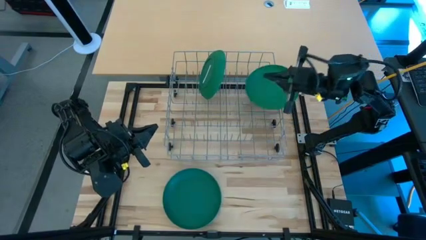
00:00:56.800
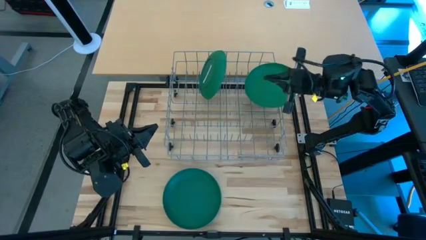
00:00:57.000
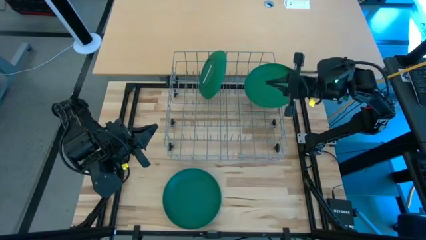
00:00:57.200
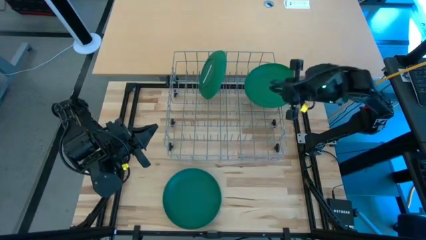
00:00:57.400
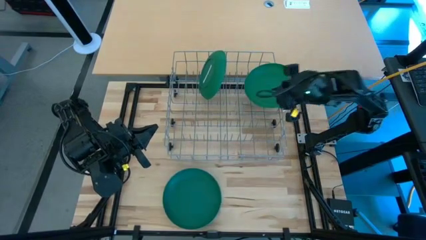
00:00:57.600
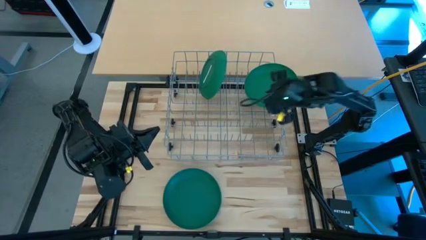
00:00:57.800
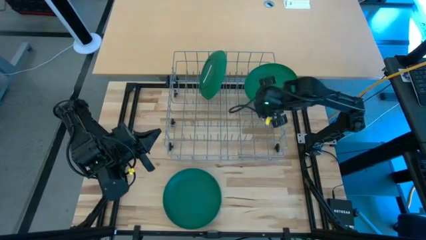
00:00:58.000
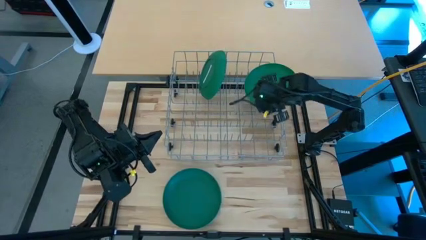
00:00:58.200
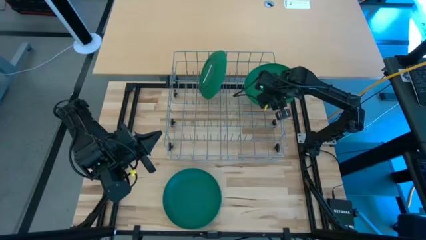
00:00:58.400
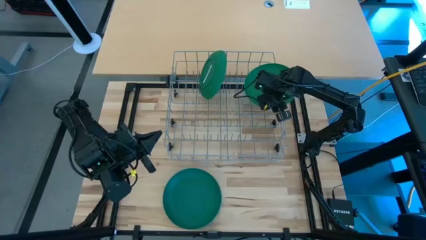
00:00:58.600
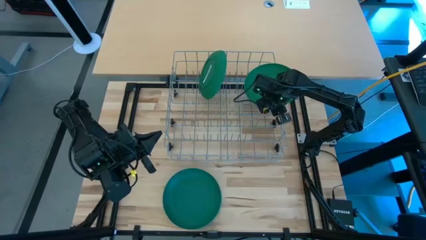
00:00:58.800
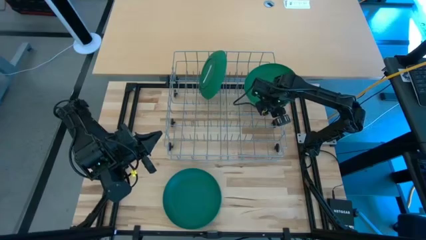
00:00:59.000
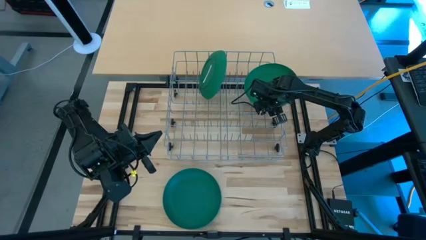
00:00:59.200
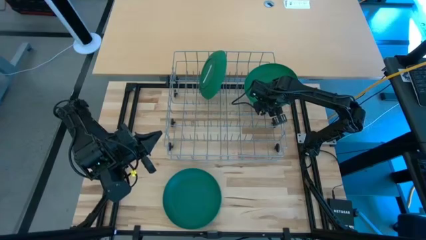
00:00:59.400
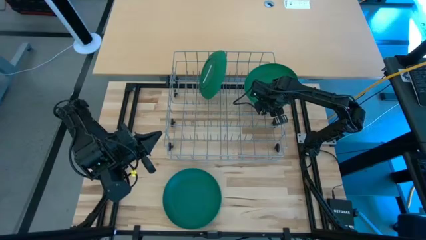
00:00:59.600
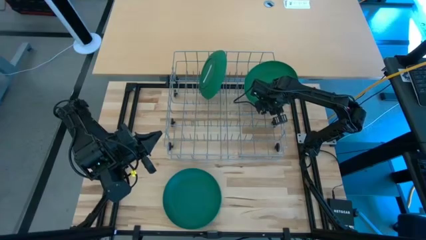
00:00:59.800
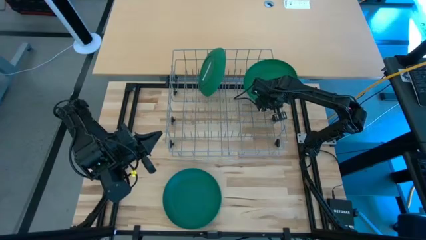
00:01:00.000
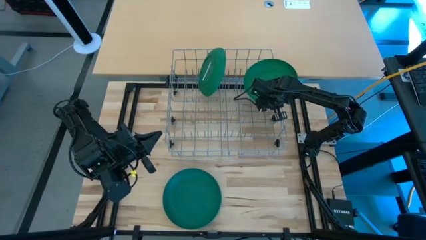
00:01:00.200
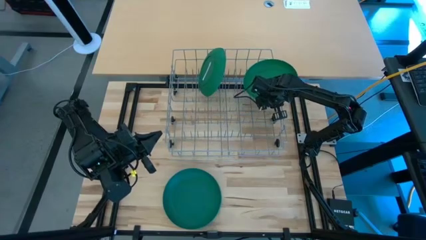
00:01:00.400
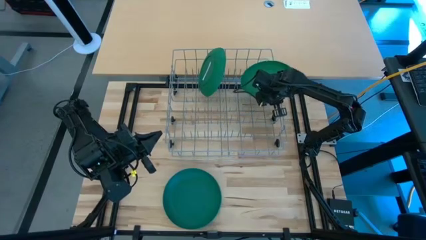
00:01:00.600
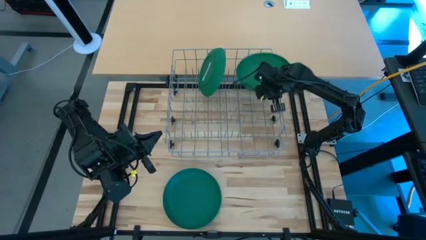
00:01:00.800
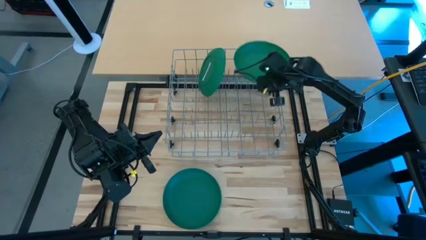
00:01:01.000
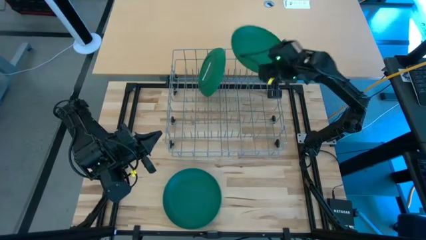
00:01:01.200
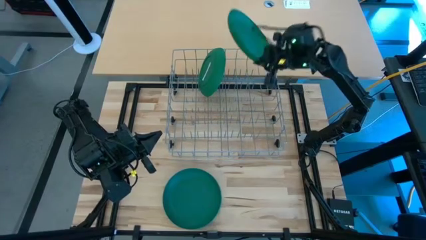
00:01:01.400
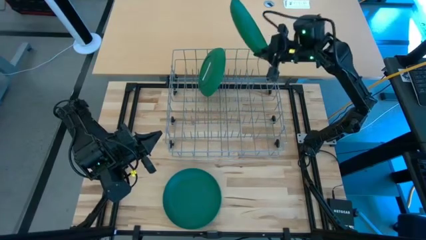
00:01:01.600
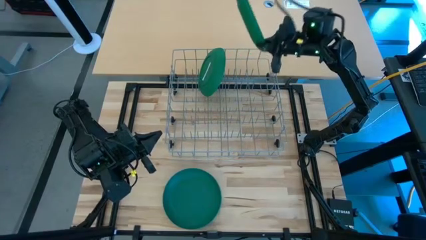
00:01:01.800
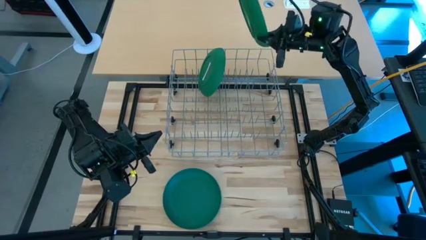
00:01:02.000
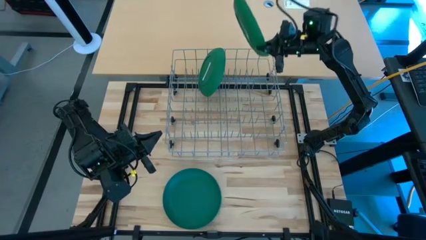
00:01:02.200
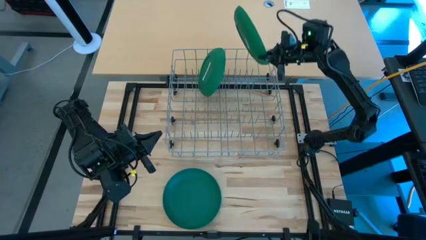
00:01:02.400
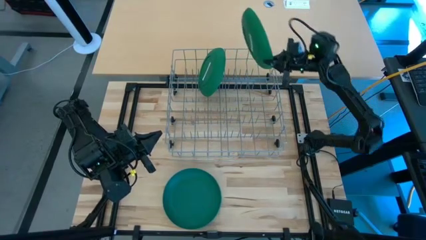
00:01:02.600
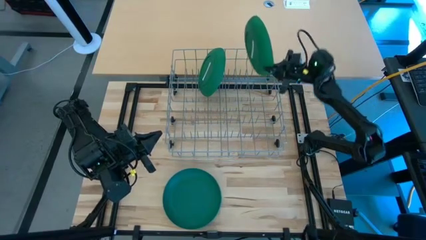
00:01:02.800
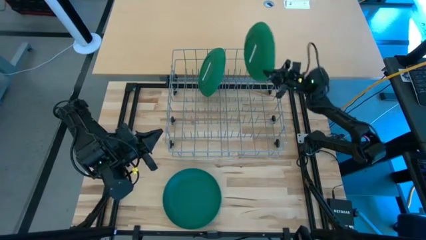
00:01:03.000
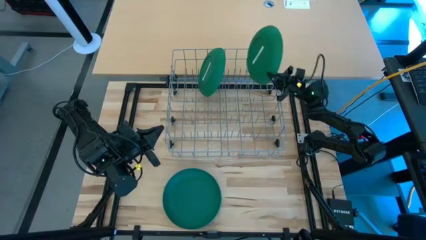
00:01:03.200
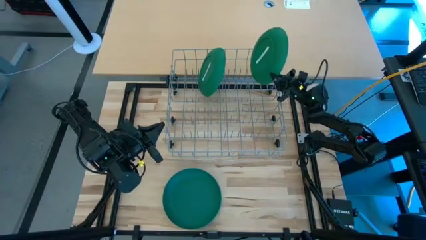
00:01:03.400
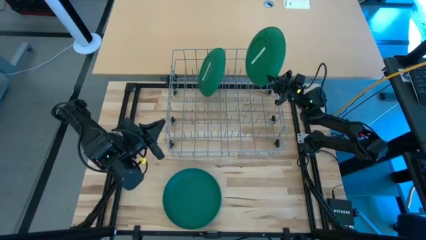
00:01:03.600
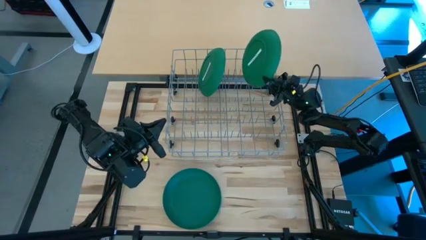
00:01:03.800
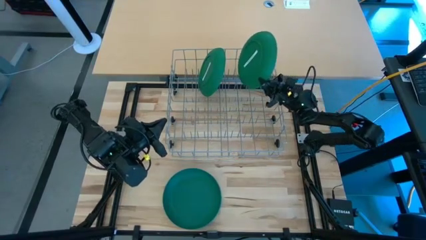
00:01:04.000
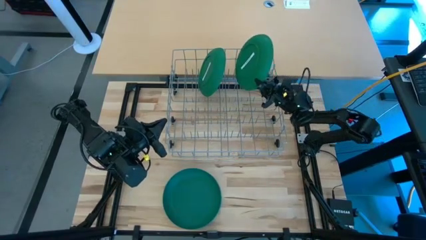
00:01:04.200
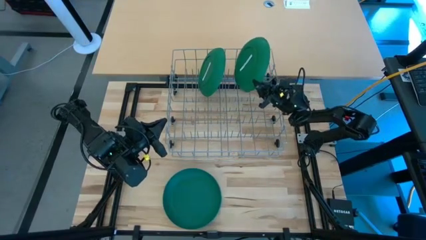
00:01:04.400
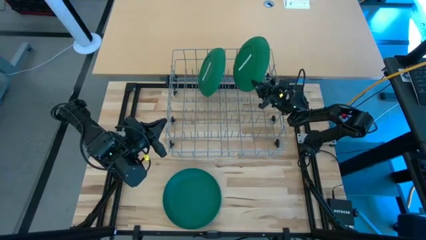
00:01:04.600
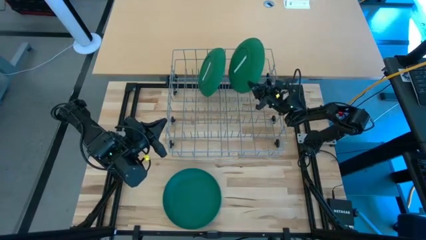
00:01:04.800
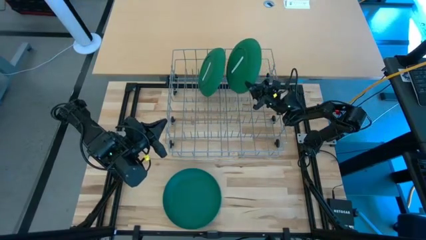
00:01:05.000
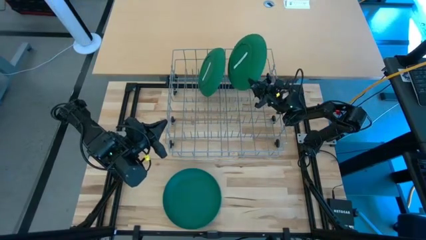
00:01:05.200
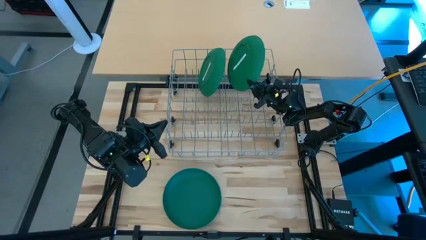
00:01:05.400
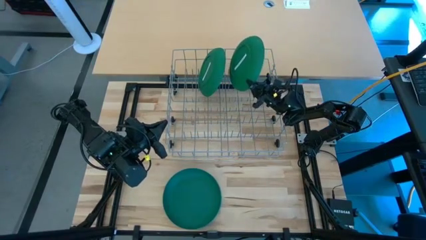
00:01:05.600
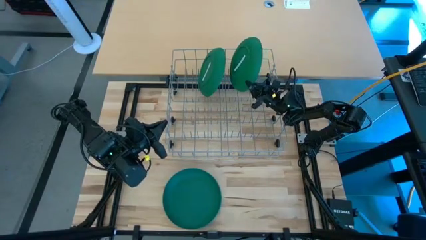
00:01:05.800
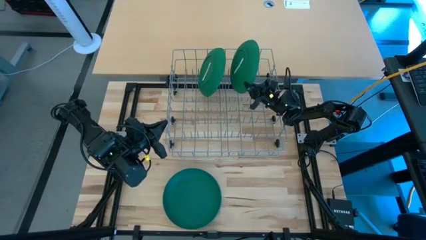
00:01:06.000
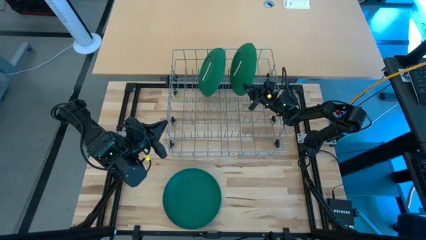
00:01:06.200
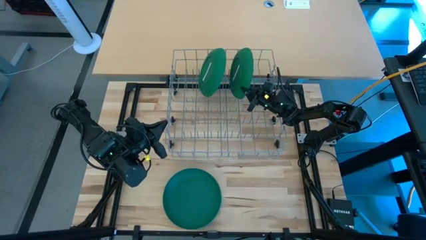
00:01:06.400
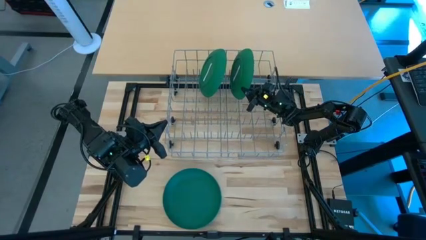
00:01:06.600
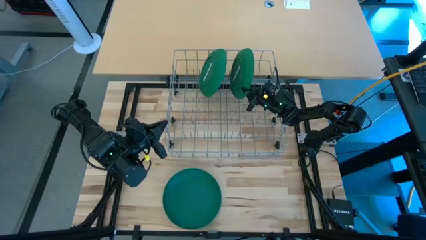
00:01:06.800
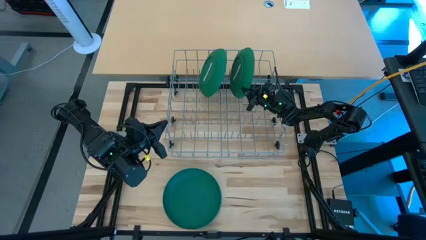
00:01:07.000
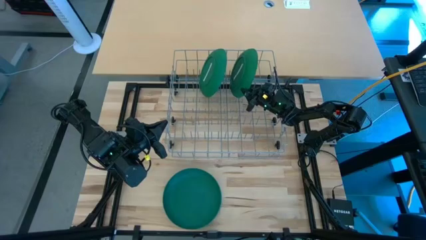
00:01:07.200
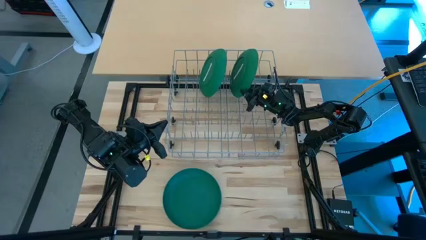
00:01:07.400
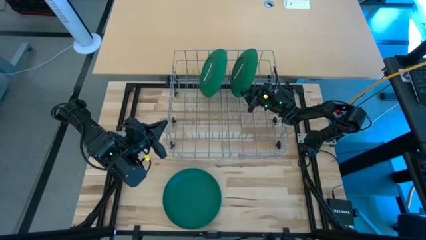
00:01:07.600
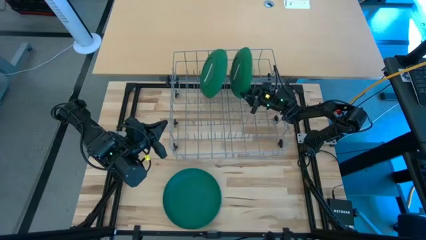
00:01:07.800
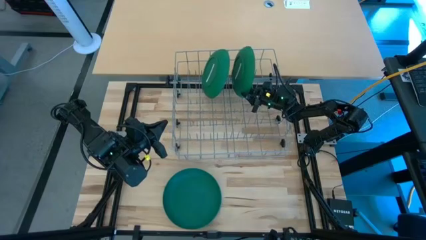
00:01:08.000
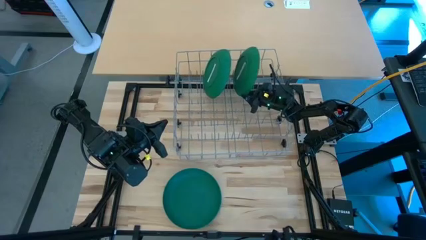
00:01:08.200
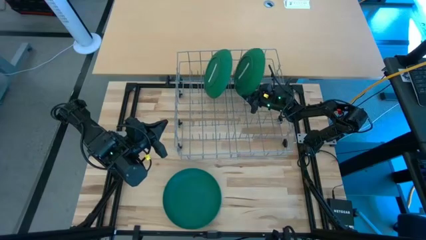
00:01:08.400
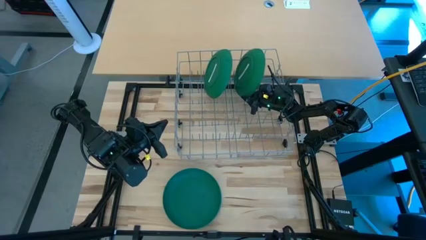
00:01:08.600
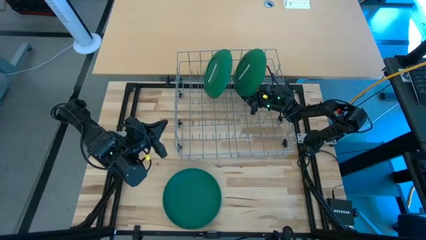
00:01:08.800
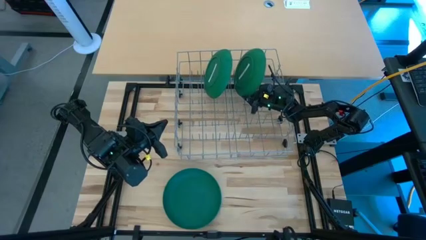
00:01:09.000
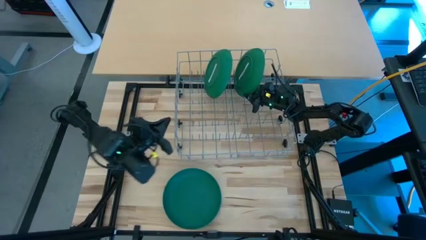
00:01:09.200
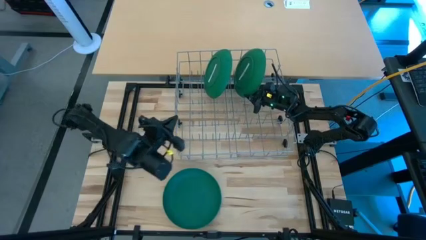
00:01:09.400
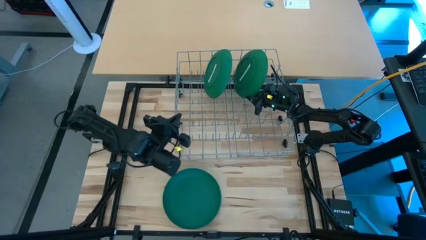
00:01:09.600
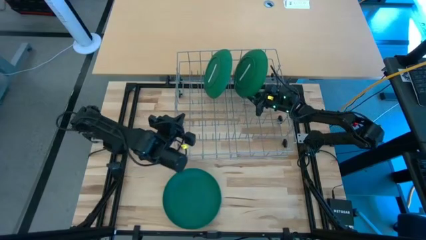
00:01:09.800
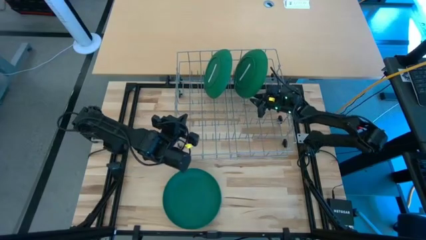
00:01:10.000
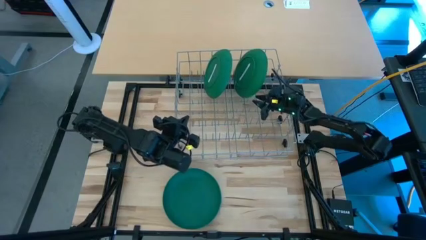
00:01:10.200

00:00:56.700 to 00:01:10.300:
Task: Sort dishes
Put the top green plate into the dish rack
